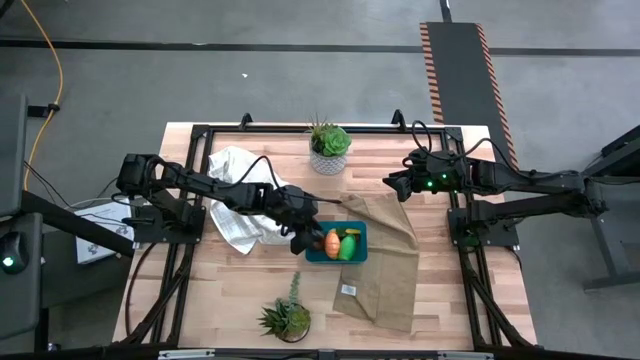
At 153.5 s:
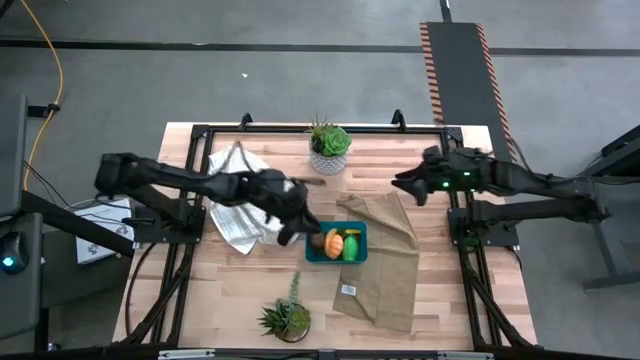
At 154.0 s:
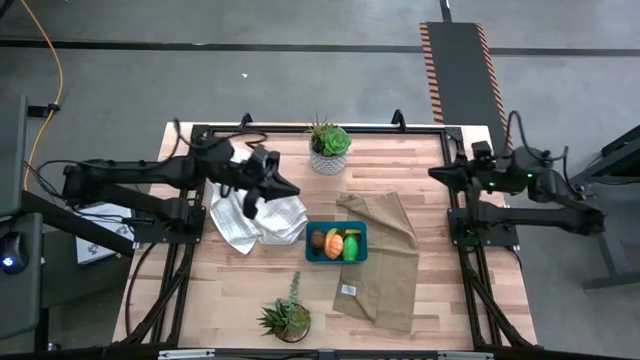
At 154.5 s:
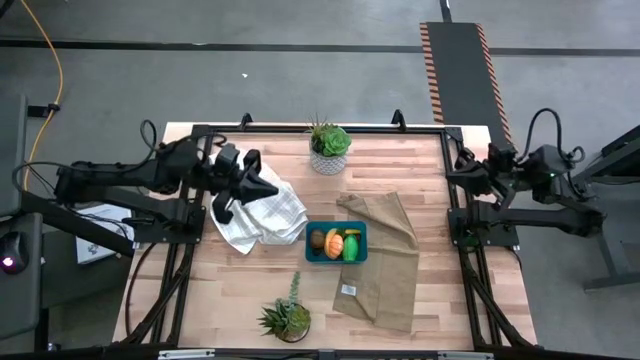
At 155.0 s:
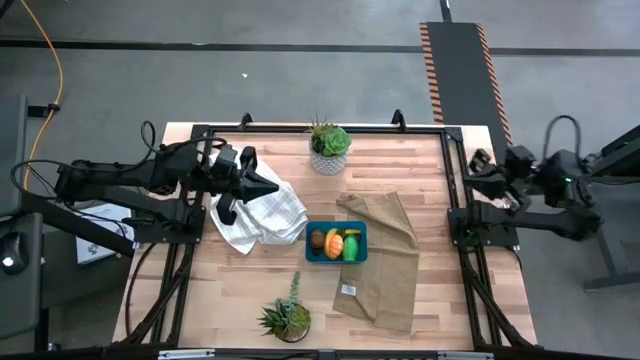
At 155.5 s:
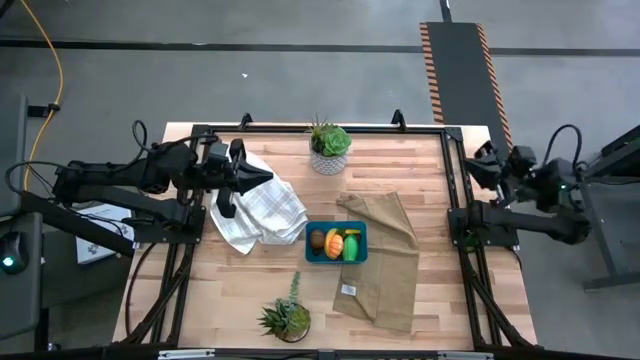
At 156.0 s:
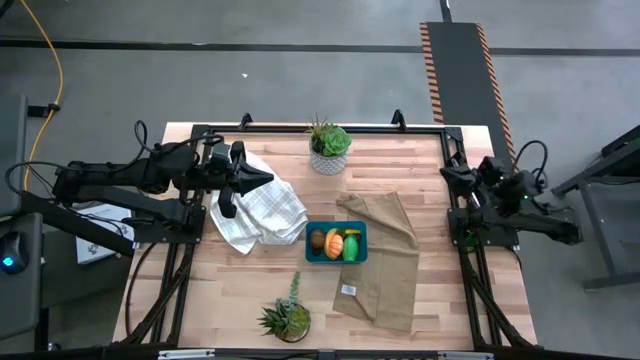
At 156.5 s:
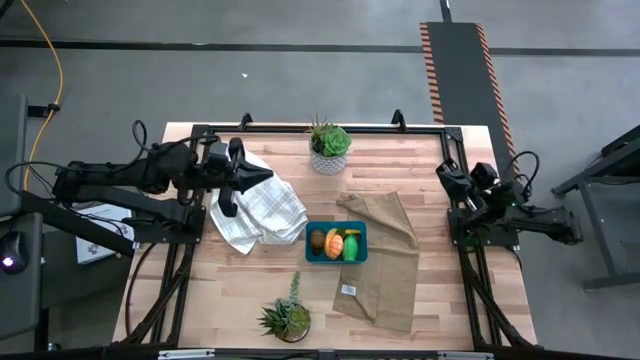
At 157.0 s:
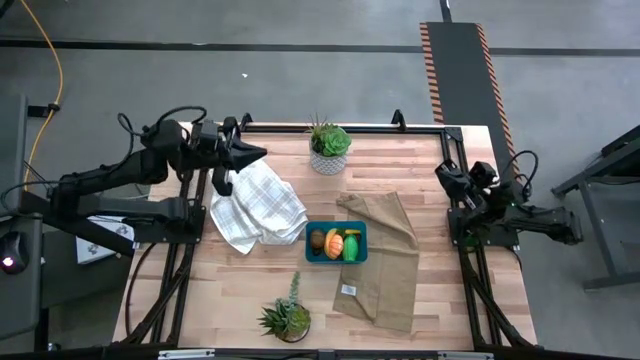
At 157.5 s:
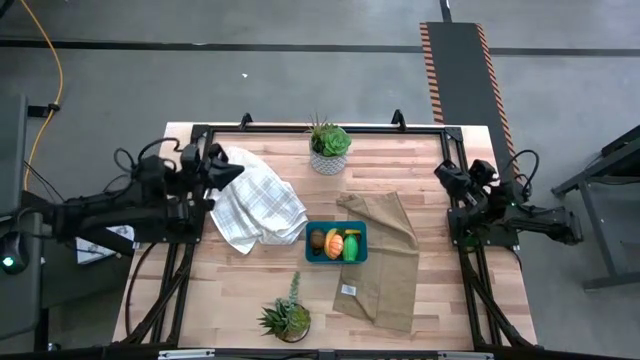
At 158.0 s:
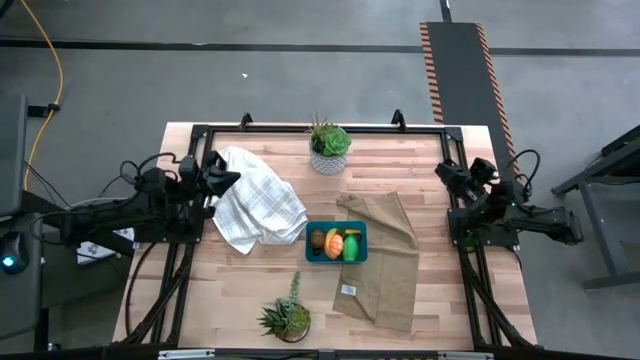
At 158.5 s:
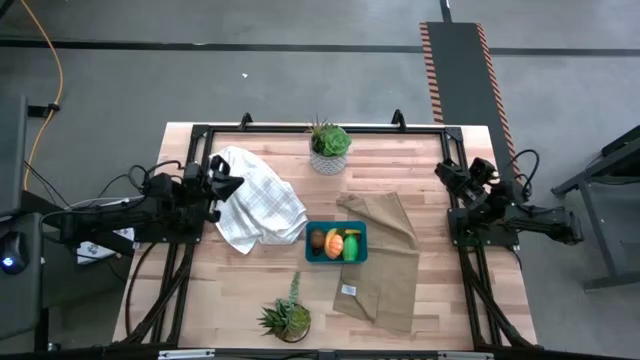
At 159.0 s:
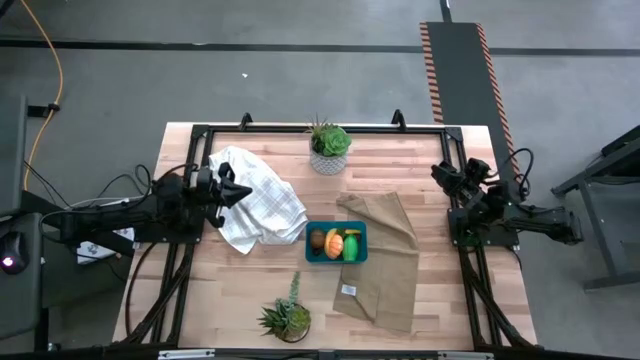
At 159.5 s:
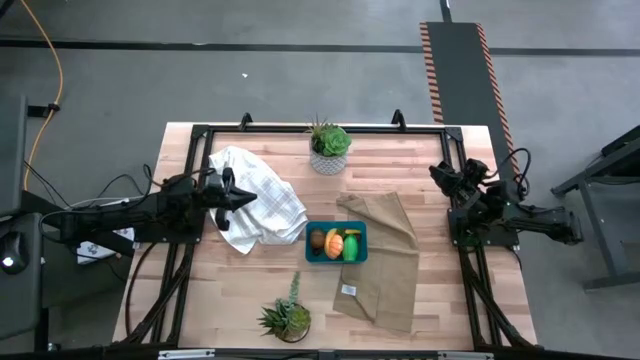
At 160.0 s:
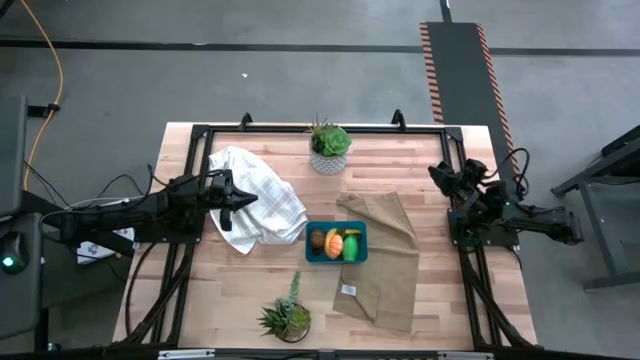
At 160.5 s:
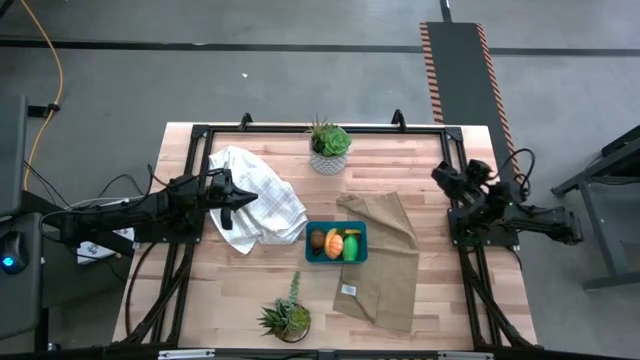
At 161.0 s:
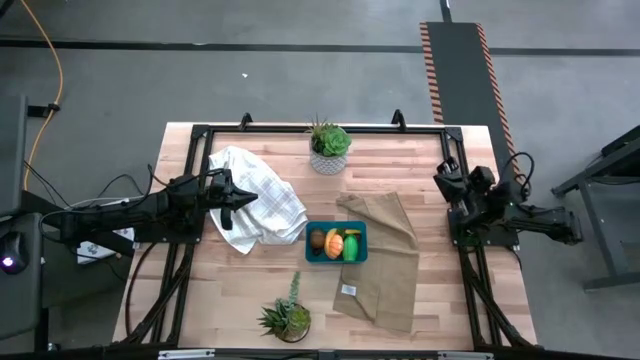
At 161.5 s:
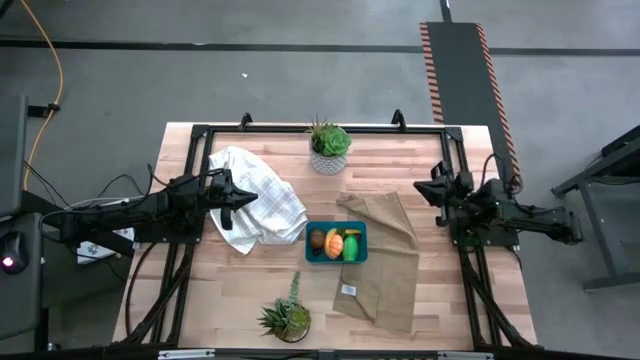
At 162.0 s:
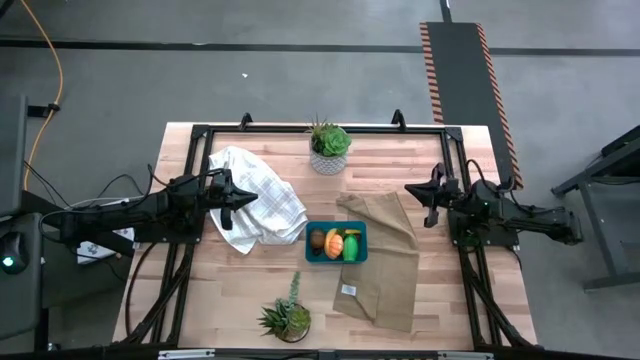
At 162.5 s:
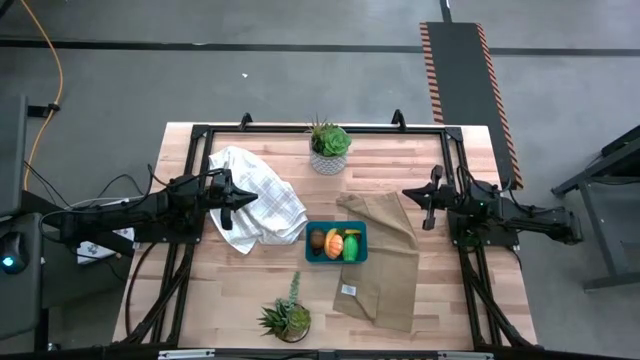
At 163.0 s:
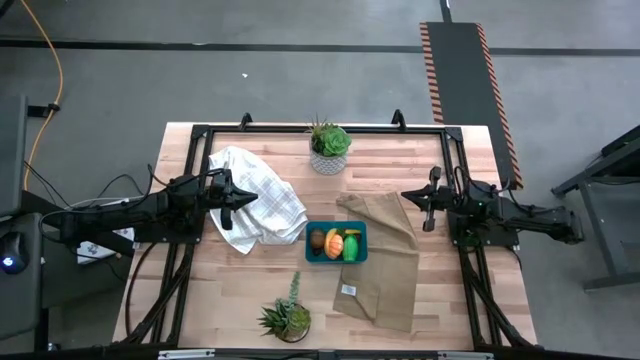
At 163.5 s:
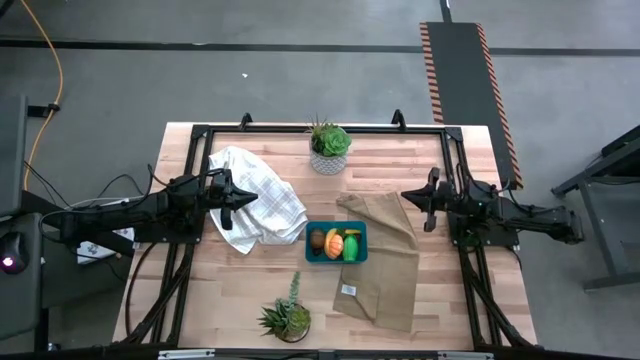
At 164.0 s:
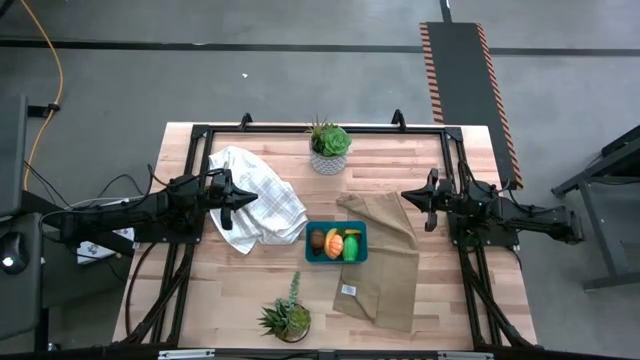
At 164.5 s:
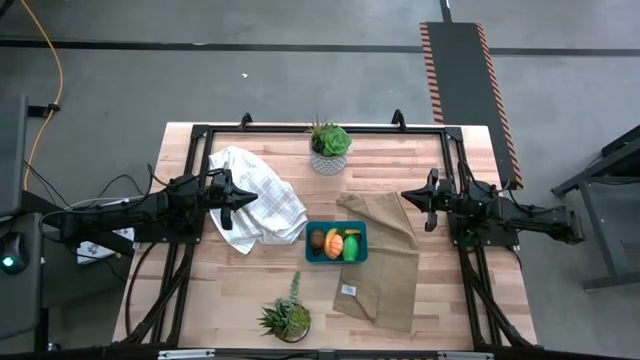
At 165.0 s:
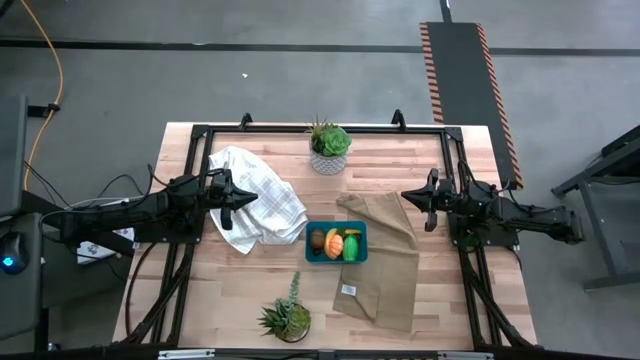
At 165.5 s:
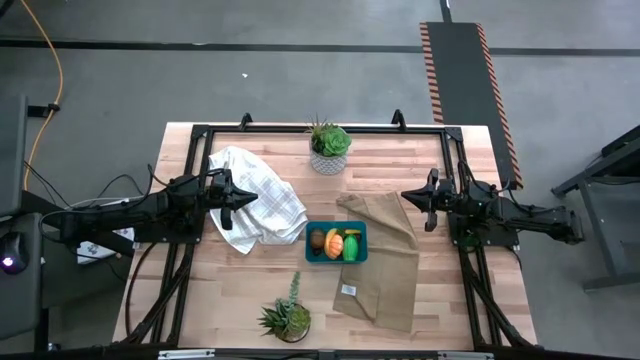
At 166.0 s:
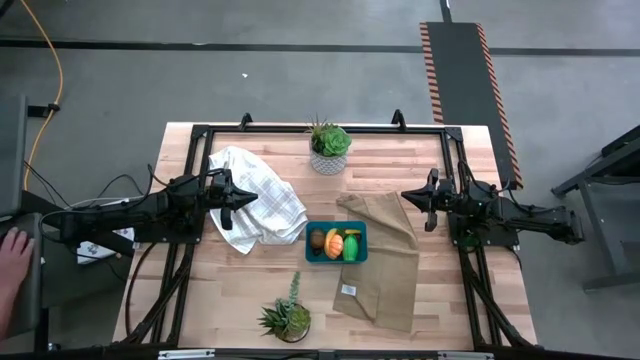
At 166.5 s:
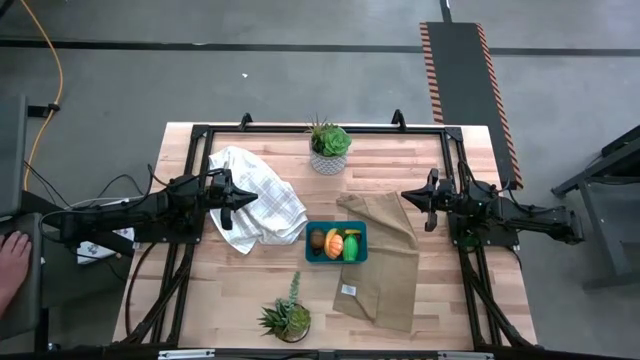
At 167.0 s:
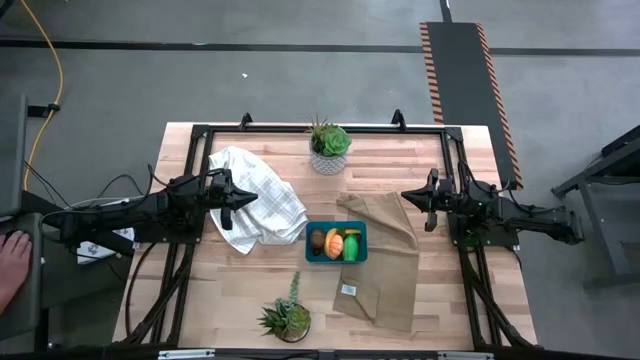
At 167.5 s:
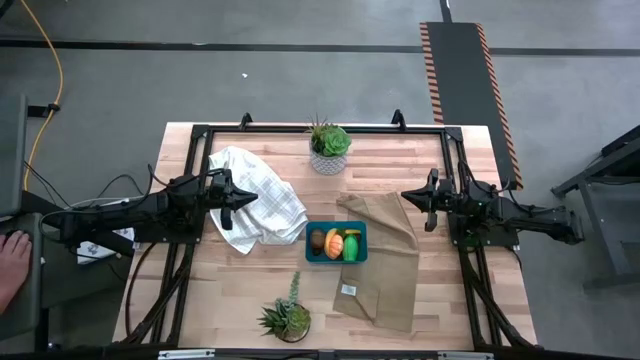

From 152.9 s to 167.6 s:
Task: Pick and placing Produce into tupperware
Return to Home Position

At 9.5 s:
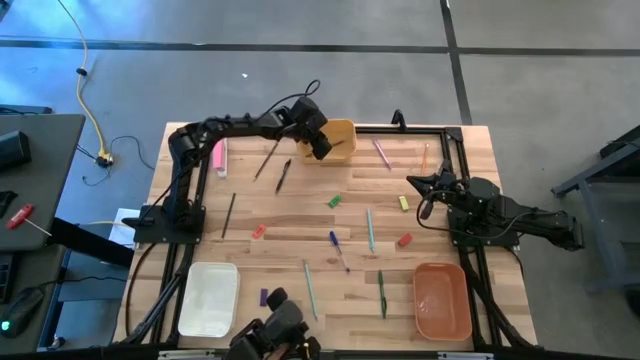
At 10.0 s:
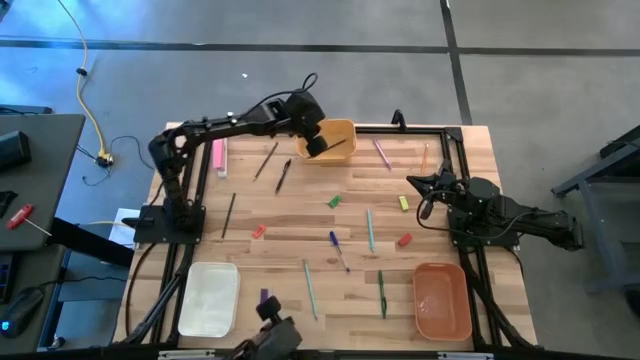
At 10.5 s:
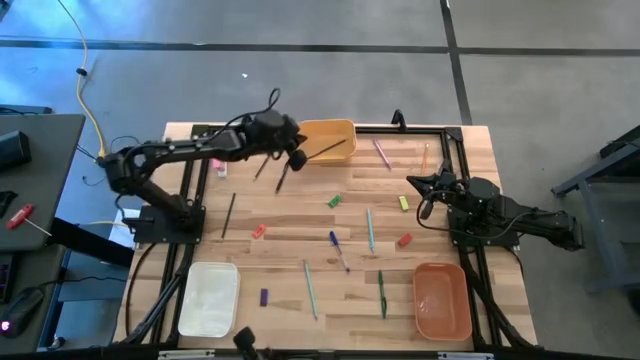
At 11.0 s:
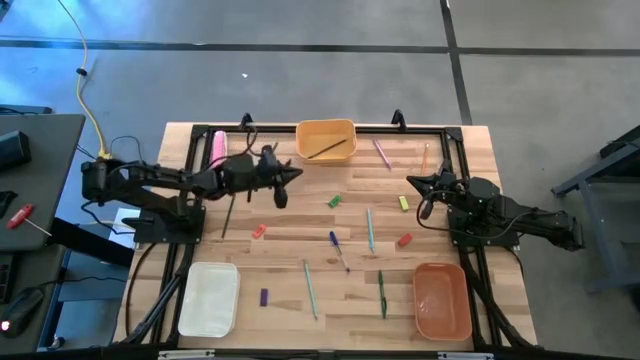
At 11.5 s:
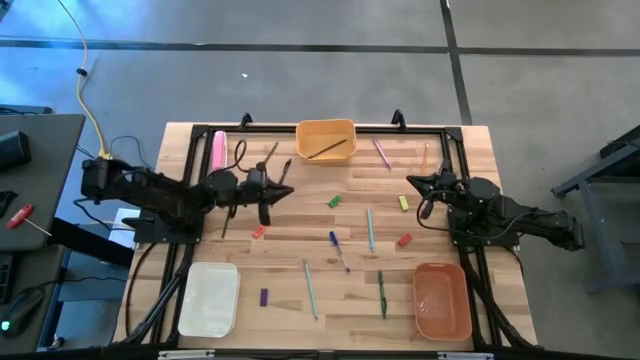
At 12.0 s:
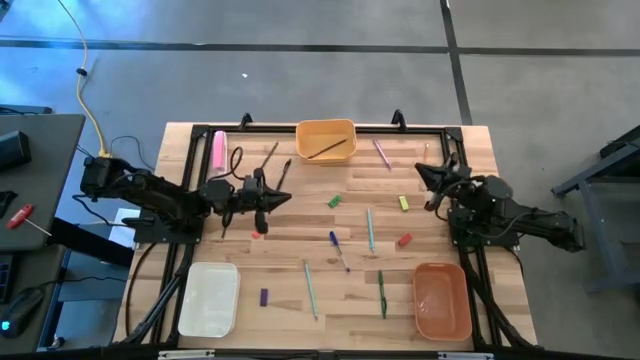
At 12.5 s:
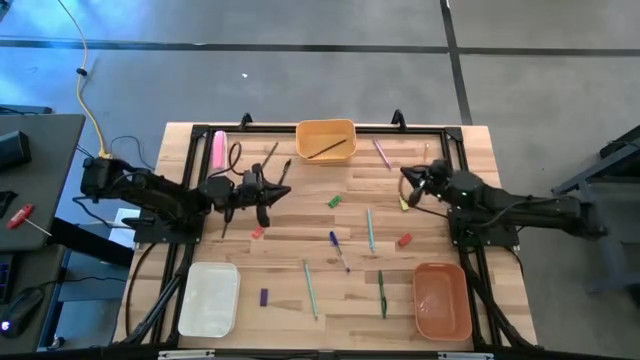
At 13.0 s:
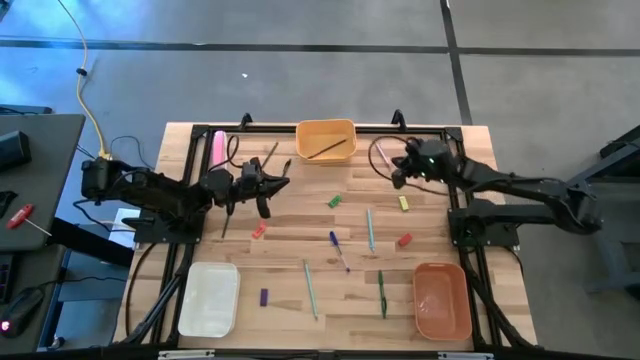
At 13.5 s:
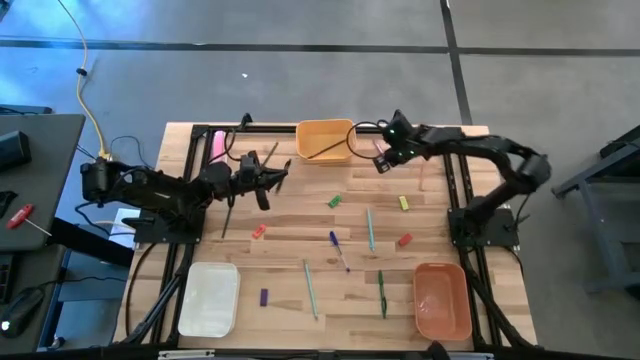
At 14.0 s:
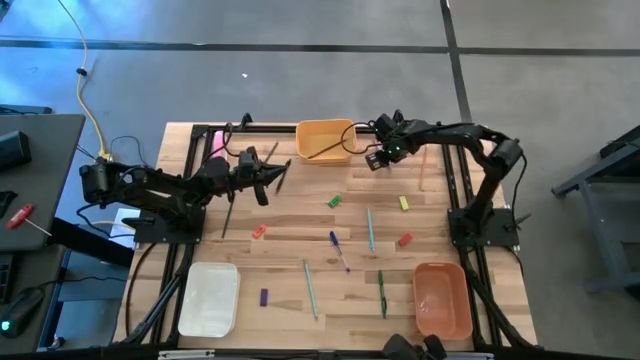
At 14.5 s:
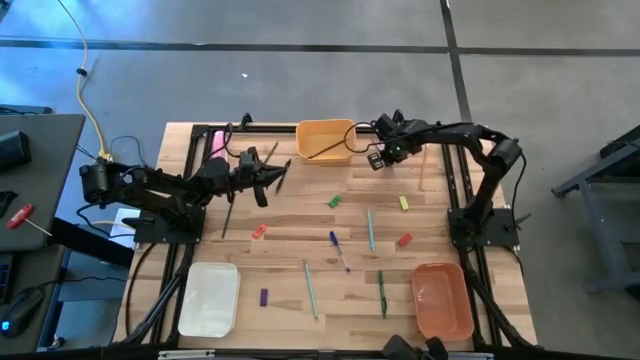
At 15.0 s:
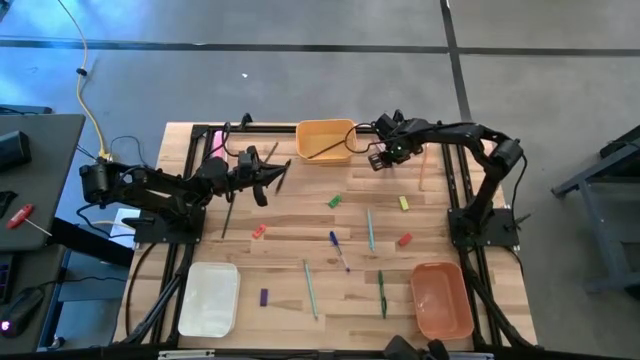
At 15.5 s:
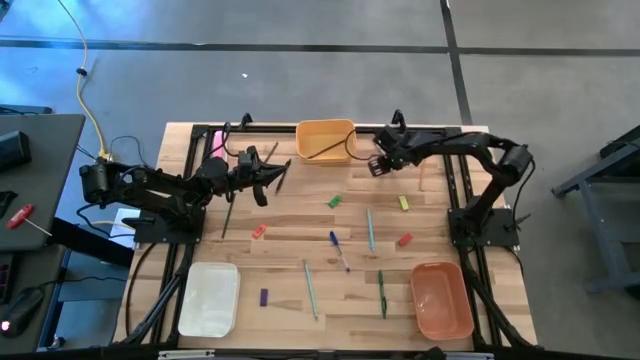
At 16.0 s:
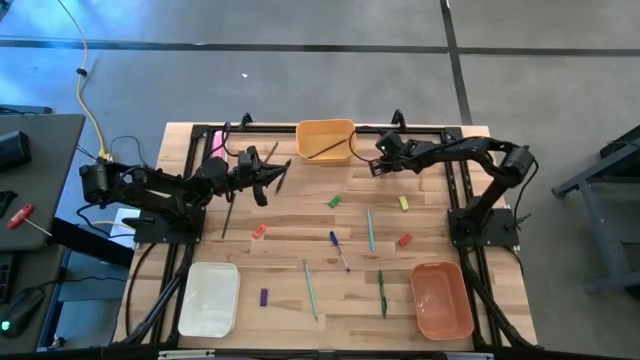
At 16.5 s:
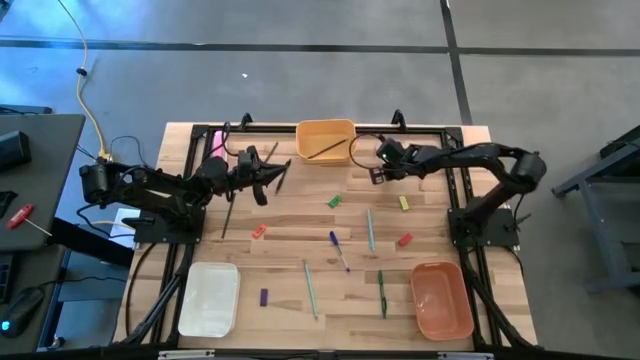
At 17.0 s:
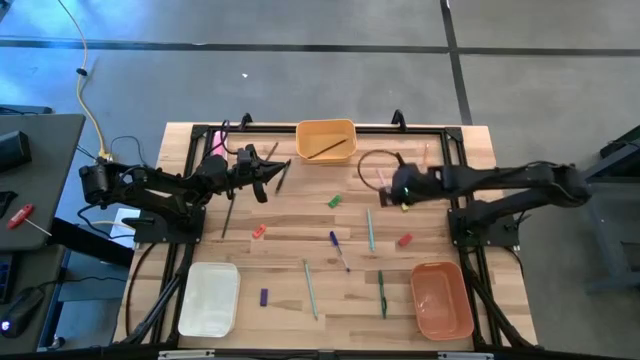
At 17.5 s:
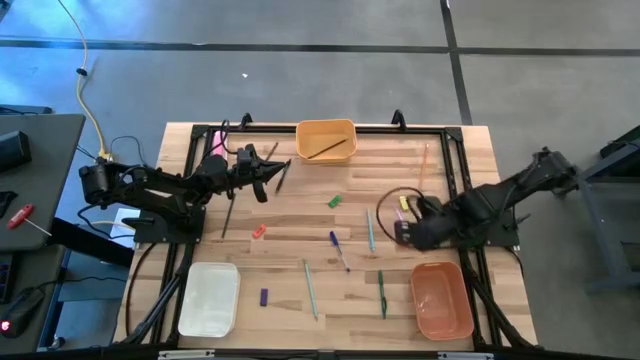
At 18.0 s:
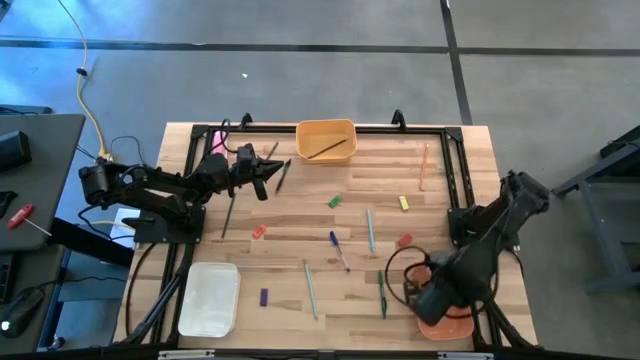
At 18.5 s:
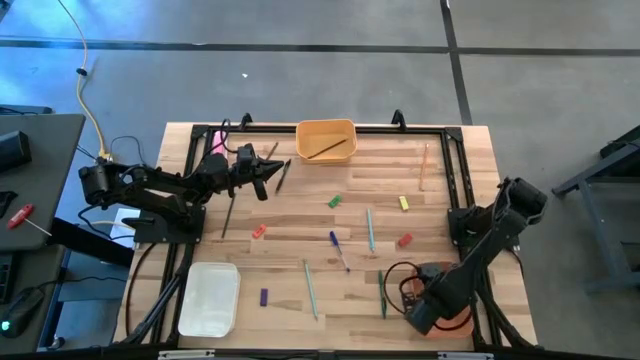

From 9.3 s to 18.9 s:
Task: Sort crayons/erasers/pens/pencils in bins
Put the pink pen into the orange bin
